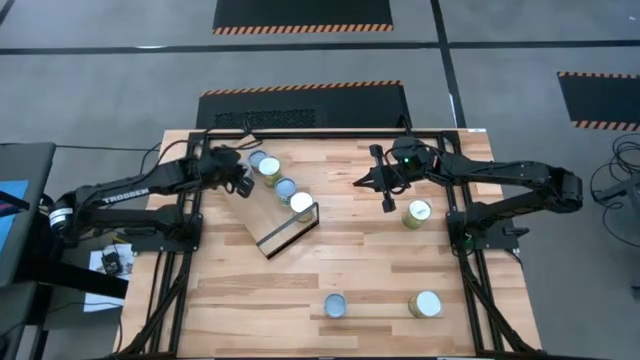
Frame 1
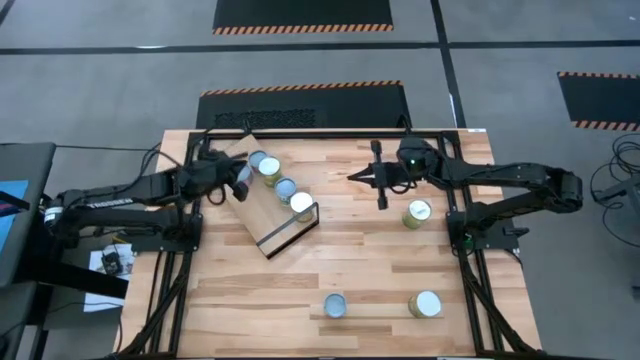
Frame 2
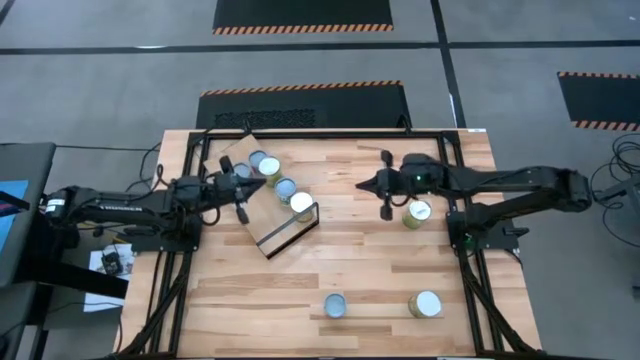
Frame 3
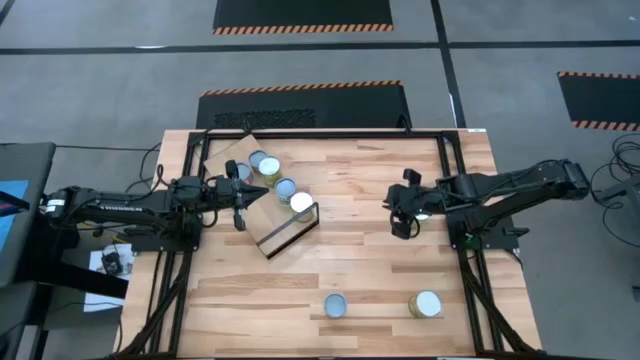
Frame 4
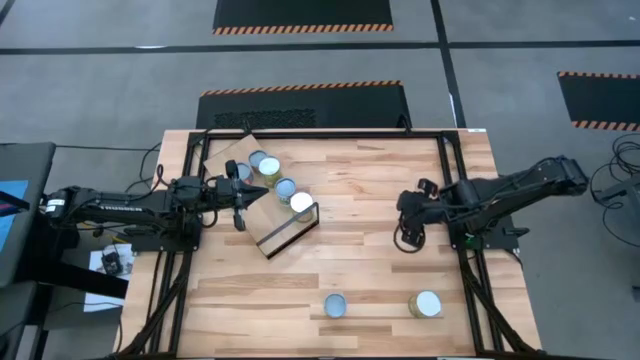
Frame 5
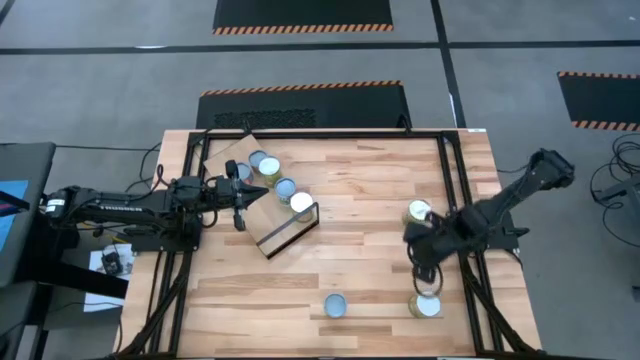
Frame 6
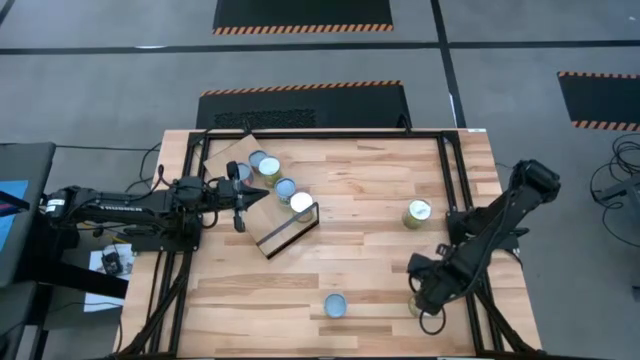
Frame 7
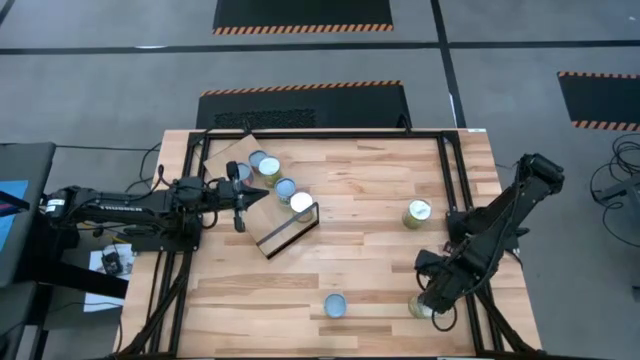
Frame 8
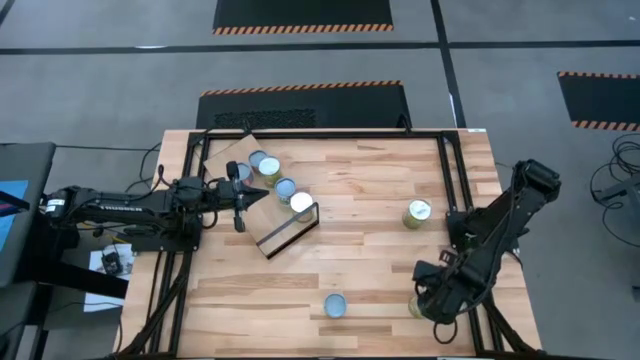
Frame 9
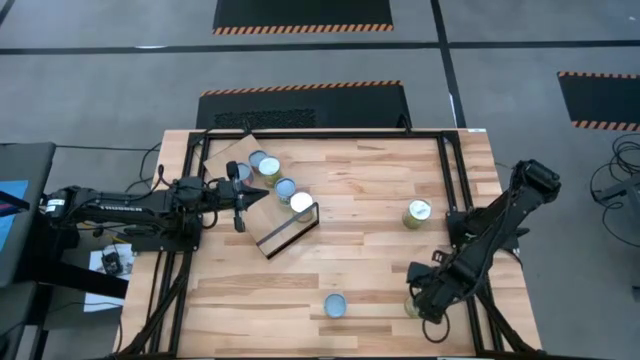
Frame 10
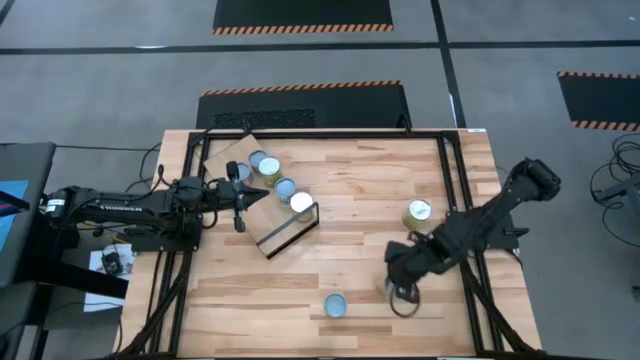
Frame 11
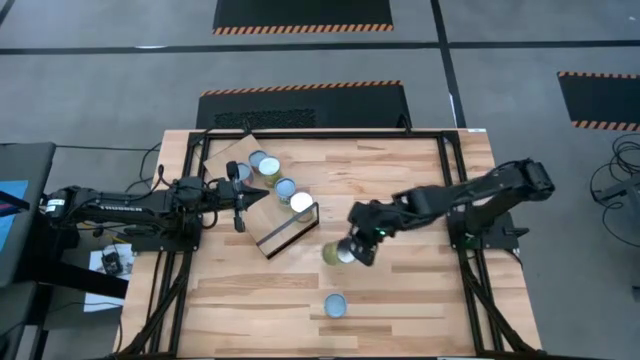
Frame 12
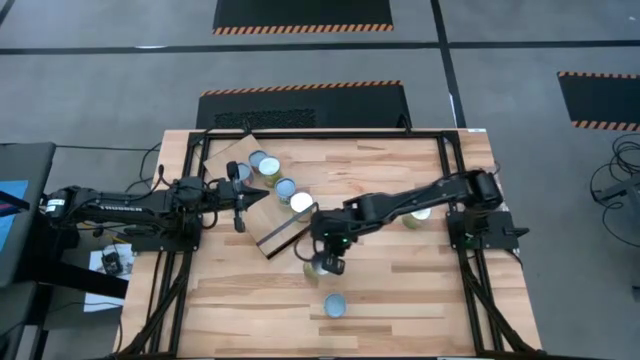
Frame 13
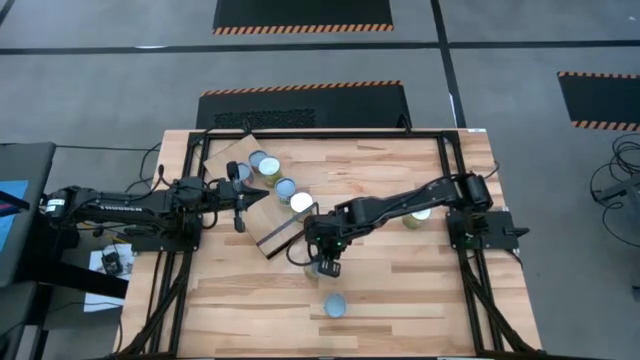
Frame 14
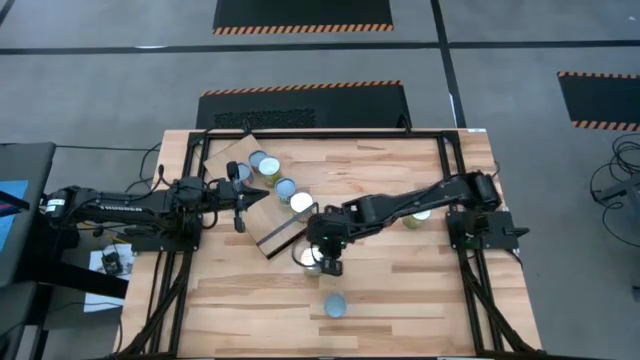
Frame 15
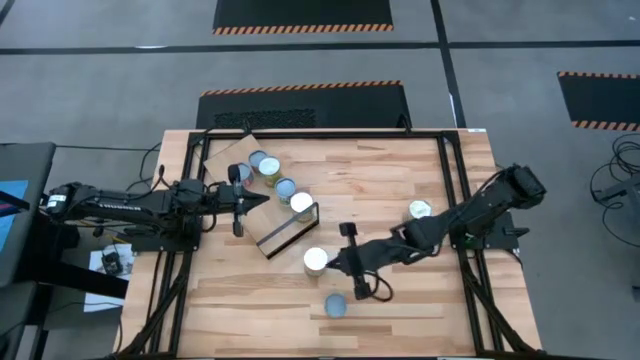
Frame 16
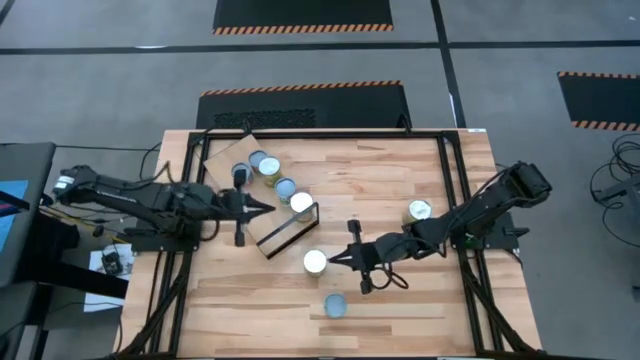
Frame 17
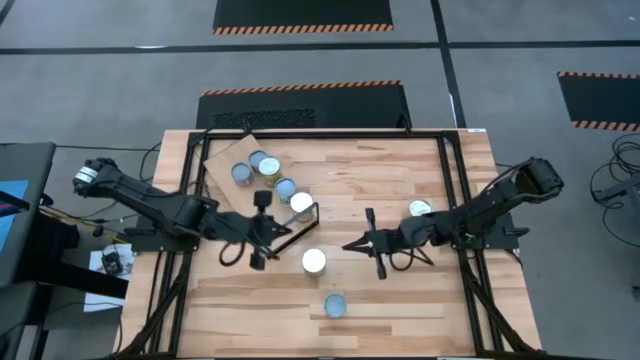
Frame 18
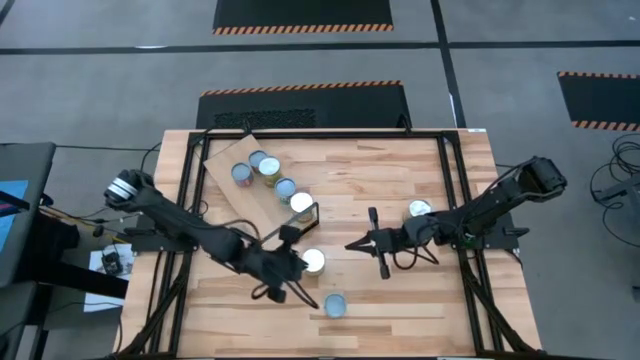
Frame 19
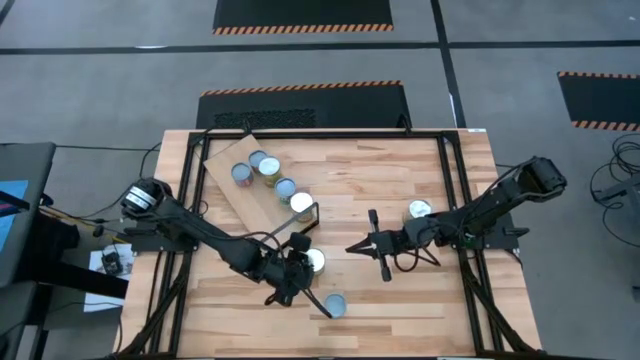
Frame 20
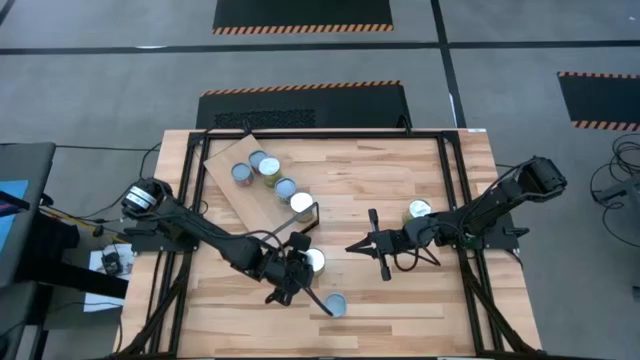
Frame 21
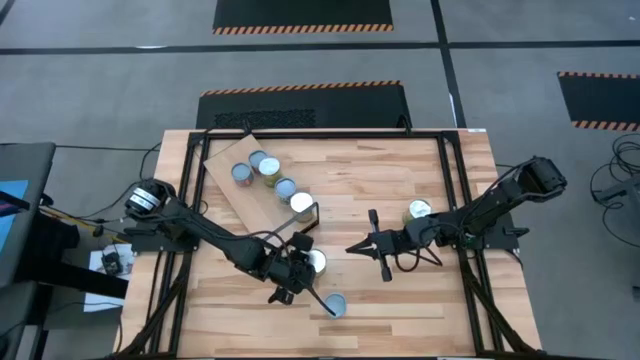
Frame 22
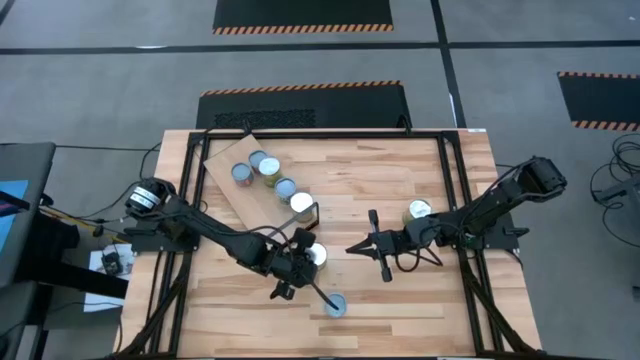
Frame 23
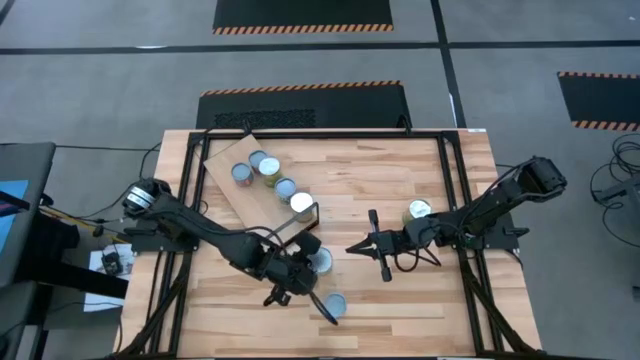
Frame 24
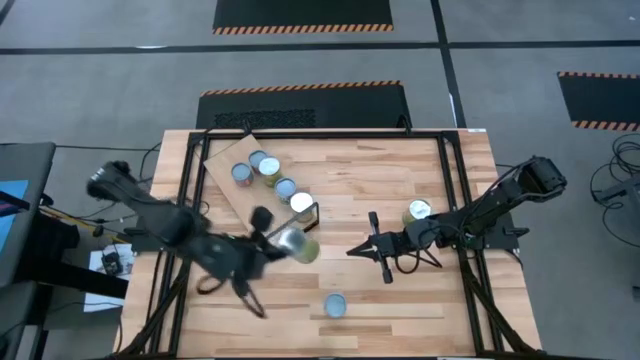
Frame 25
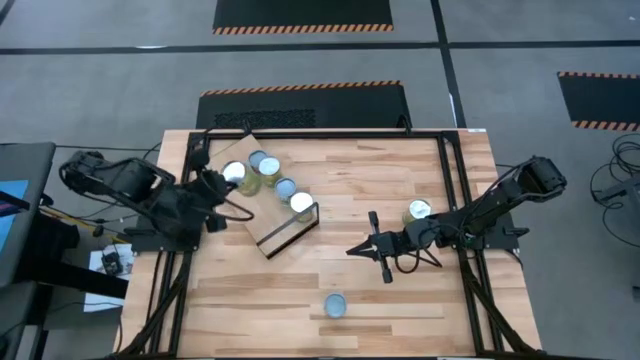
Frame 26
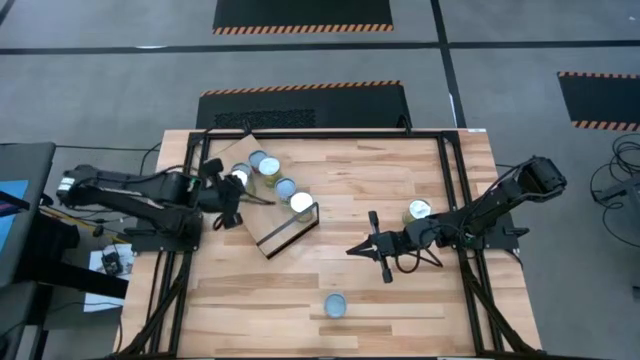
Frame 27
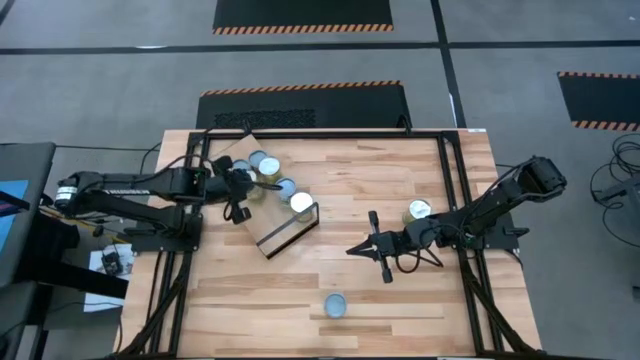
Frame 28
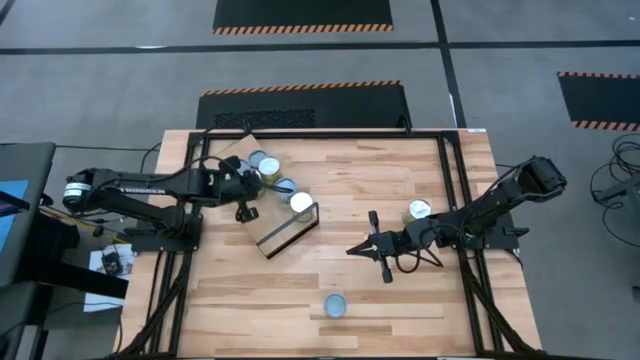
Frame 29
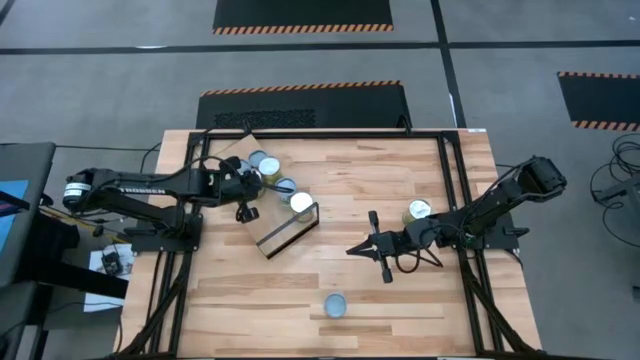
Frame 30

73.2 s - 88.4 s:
Task: Pick and place cans onto a shelf
Put the canned pears on the shelf

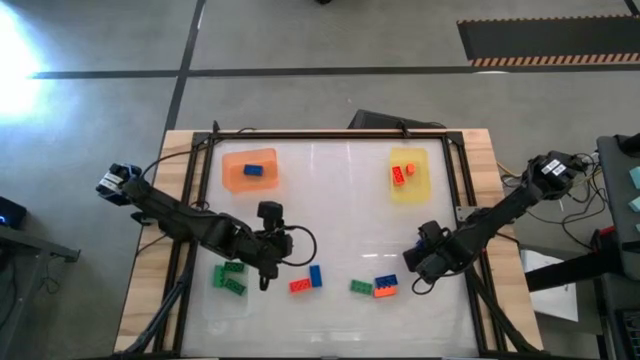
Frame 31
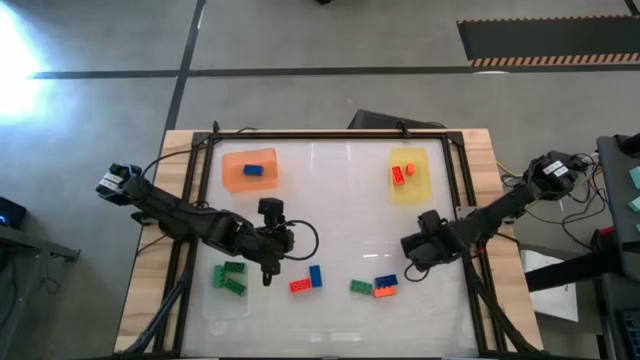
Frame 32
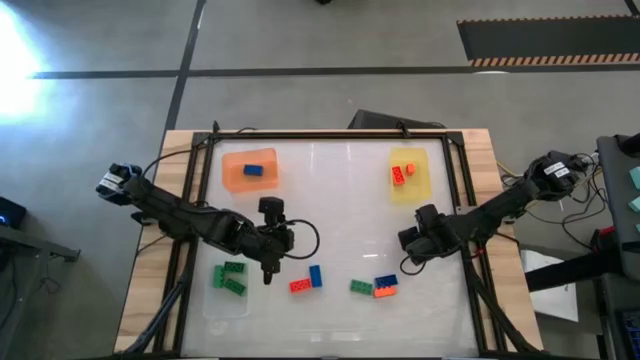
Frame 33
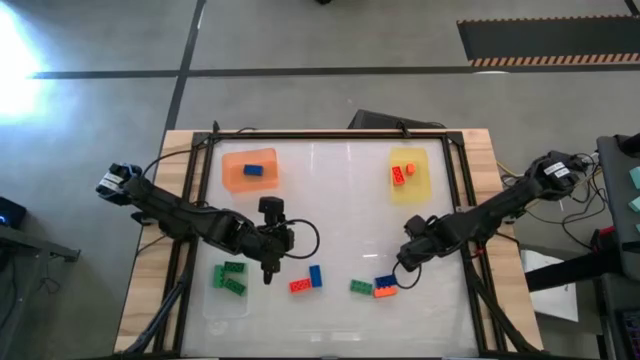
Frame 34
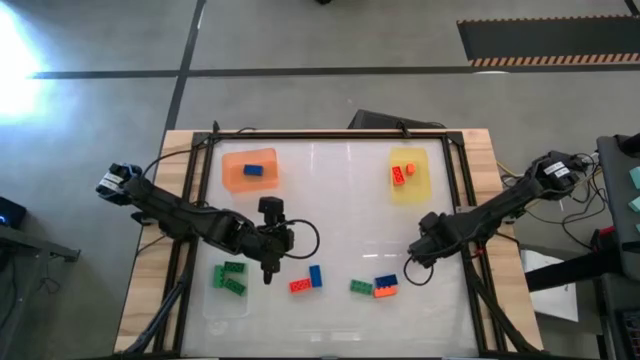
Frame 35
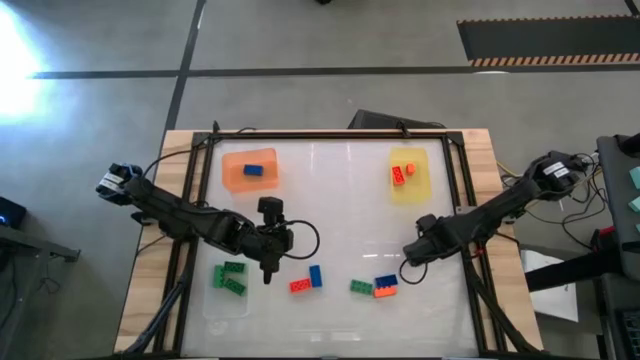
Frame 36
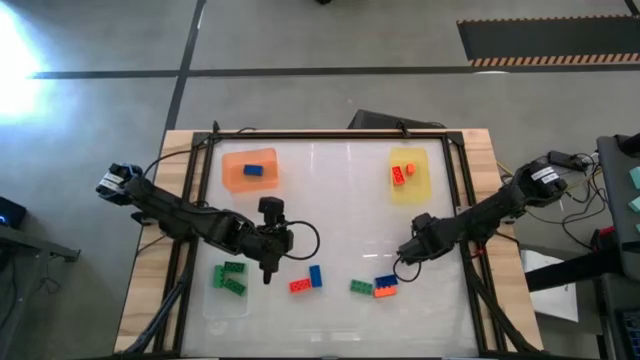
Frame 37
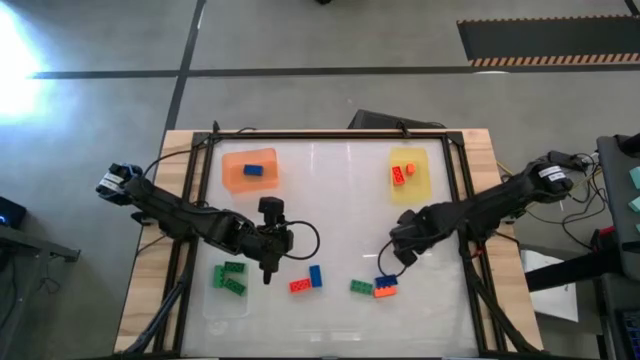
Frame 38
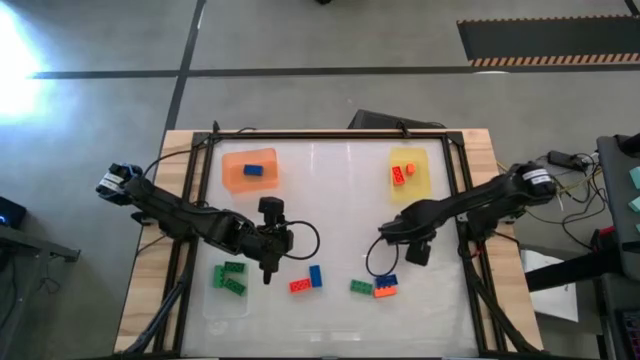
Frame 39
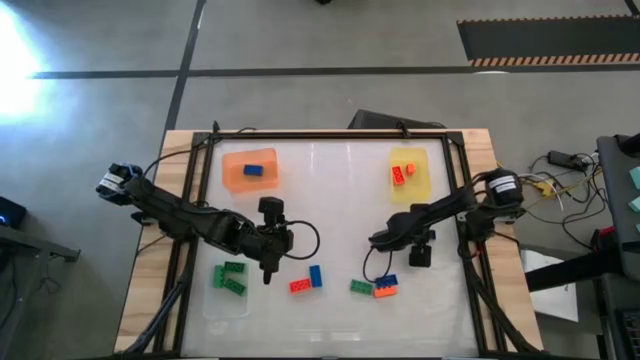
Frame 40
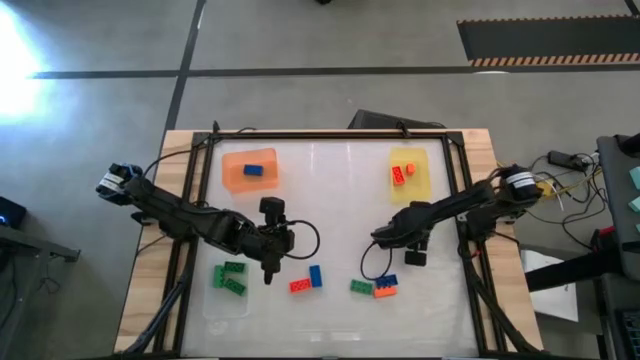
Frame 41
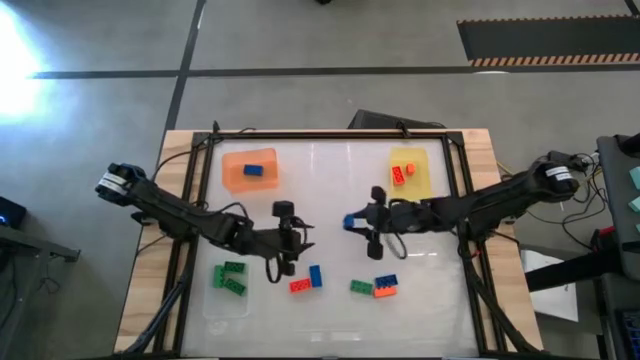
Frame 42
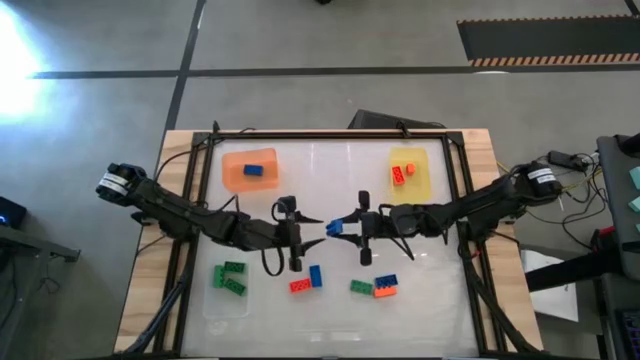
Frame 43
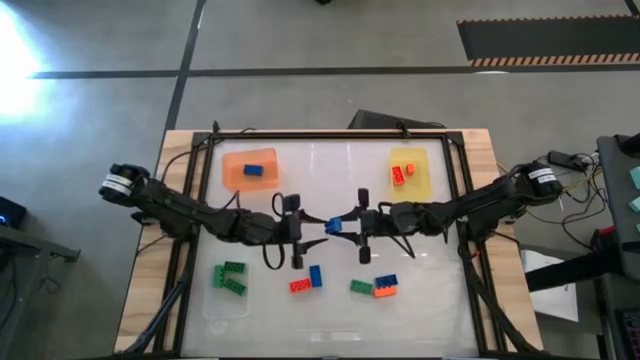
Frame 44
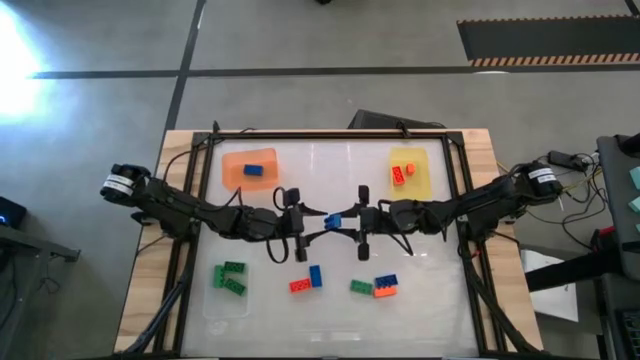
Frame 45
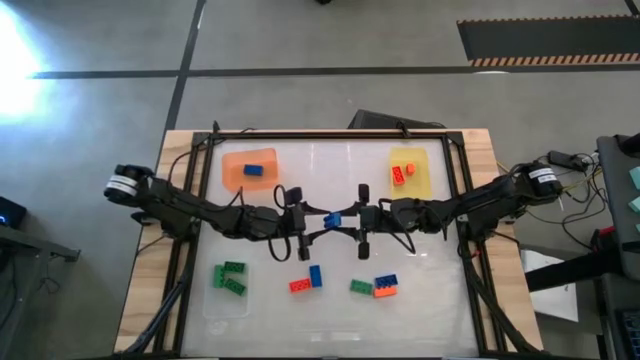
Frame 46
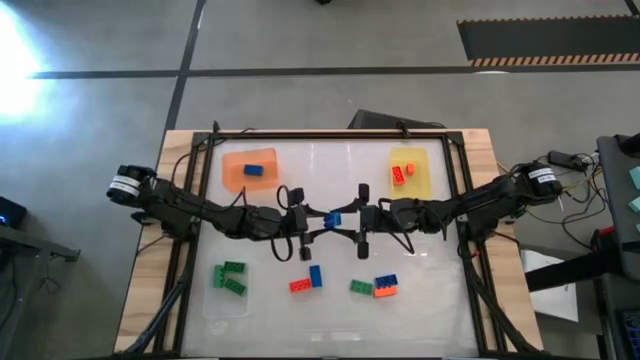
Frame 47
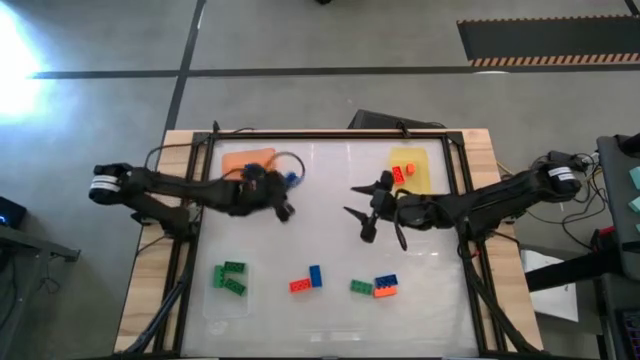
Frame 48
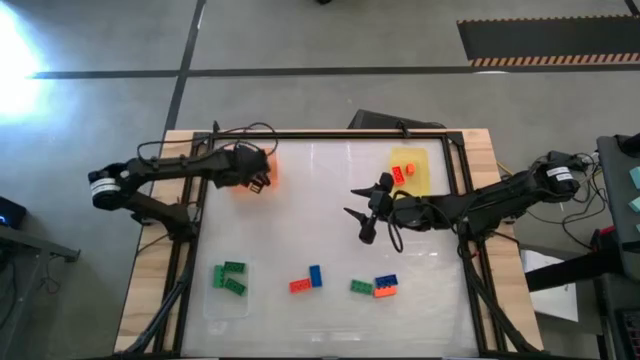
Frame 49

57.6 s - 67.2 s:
Task: Sort & place blocks by color
Put the blue game piece into the orange bin
